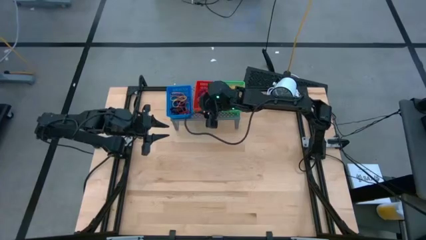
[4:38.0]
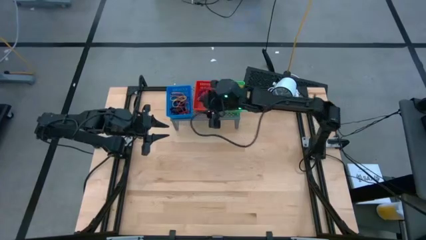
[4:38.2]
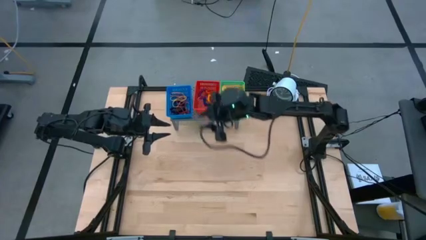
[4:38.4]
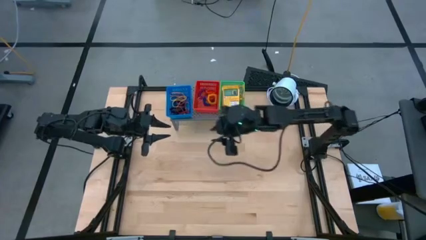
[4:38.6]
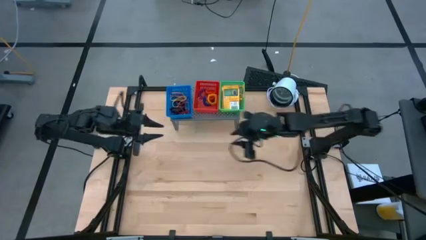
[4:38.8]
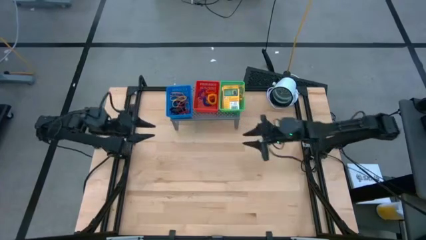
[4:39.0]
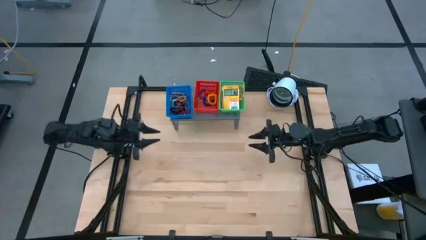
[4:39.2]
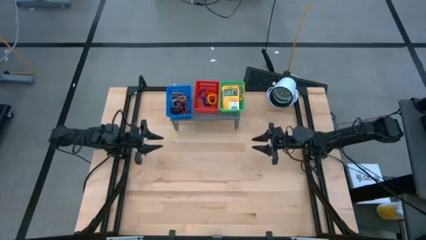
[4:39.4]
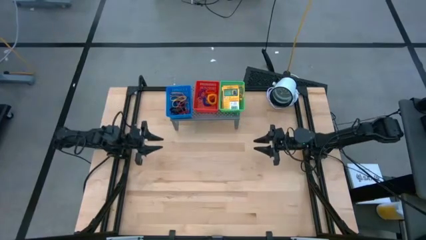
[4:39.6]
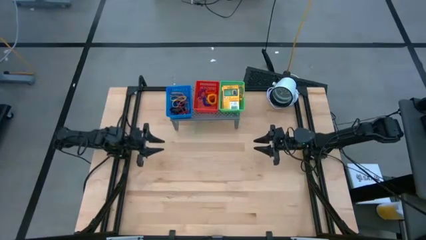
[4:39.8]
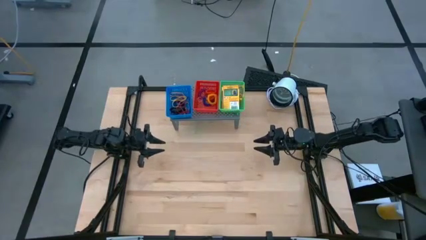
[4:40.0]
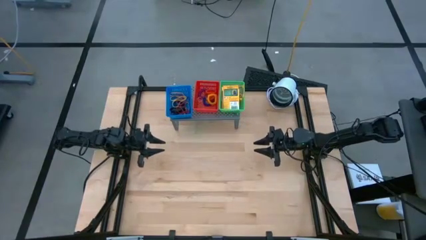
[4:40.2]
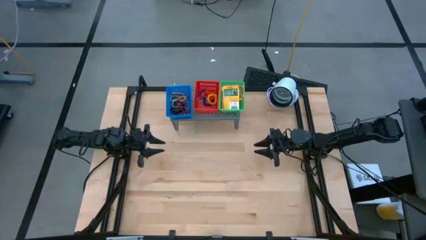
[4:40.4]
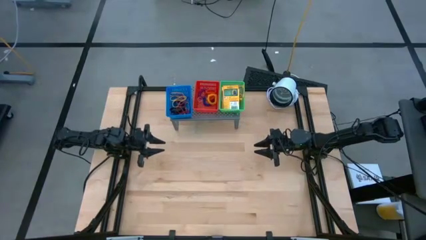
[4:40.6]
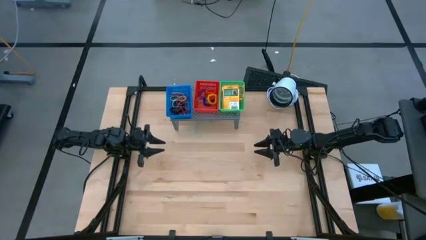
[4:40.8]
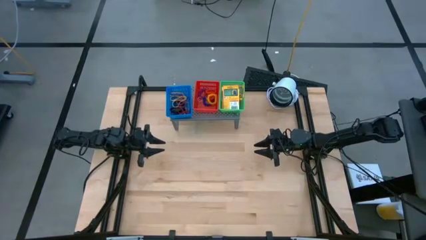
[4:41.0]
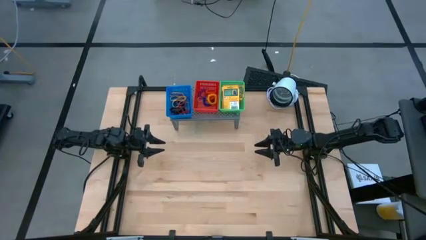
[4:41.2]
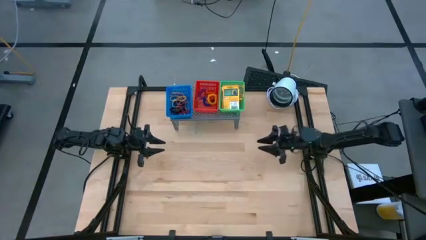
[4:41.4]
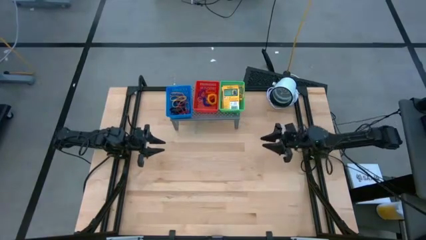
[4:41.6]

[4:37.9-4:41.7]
Task: Pick & Place Office Desk Supplies
Return to Home Position

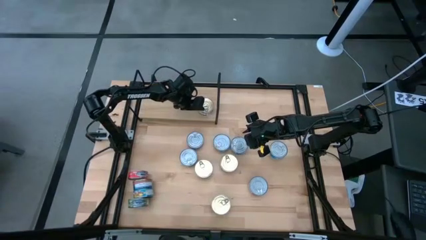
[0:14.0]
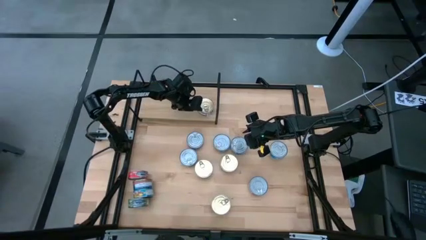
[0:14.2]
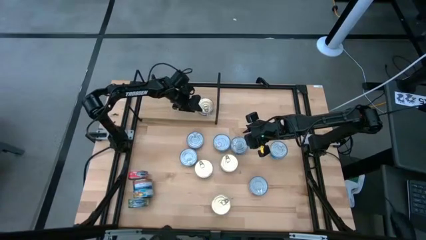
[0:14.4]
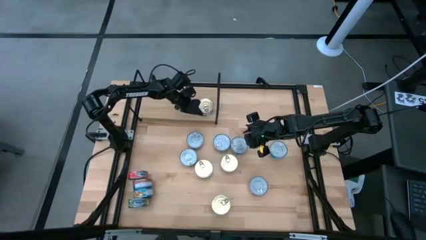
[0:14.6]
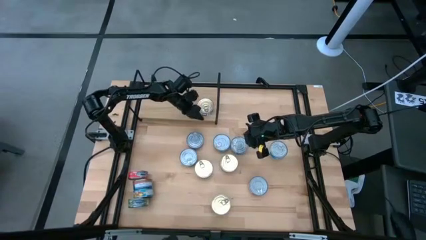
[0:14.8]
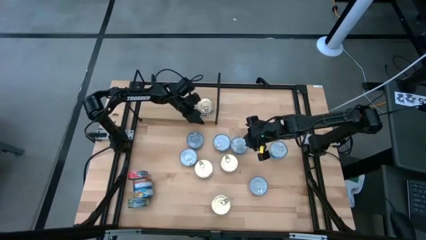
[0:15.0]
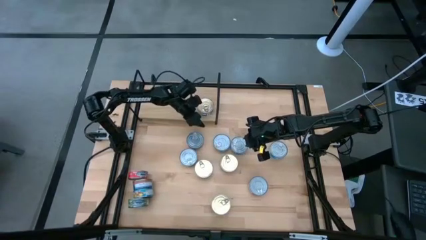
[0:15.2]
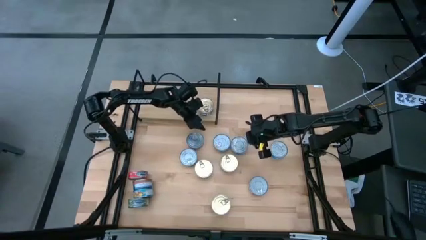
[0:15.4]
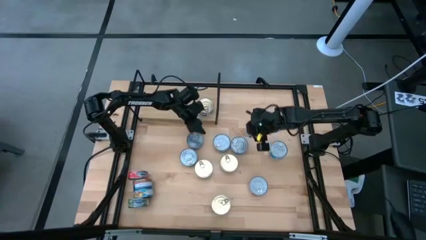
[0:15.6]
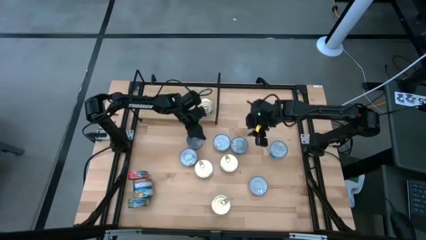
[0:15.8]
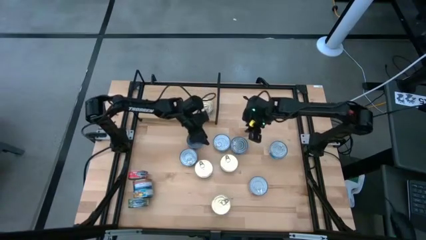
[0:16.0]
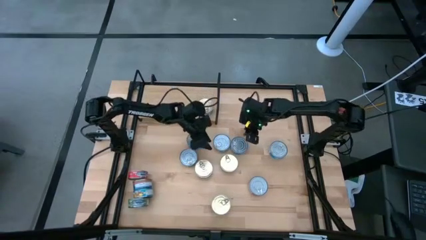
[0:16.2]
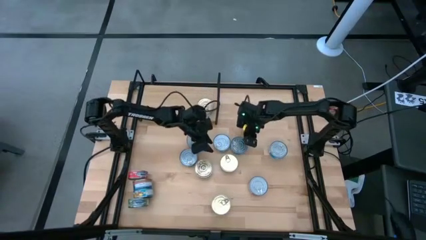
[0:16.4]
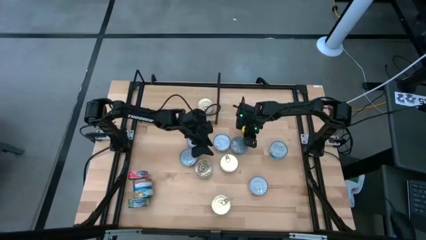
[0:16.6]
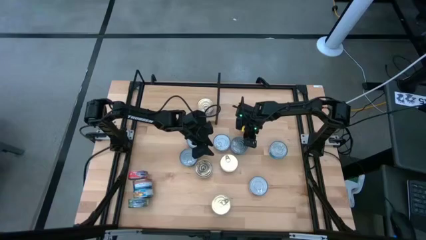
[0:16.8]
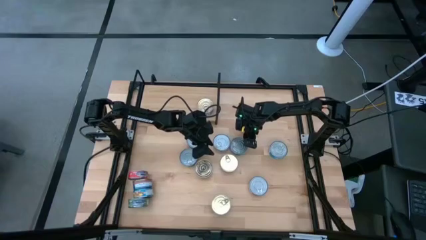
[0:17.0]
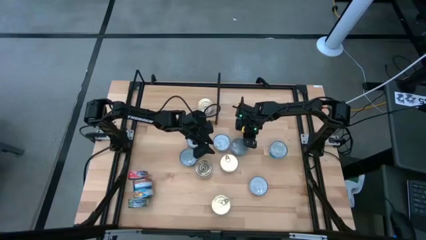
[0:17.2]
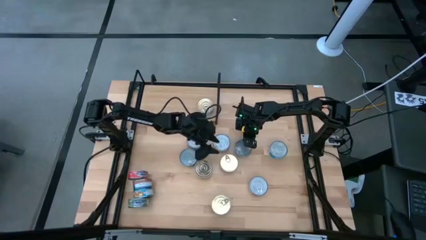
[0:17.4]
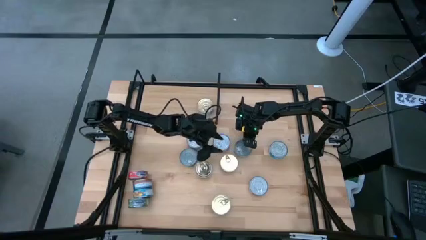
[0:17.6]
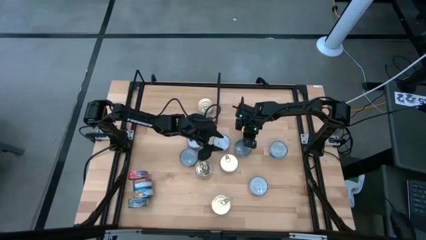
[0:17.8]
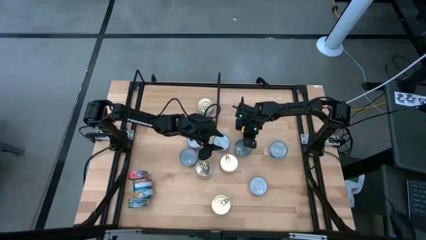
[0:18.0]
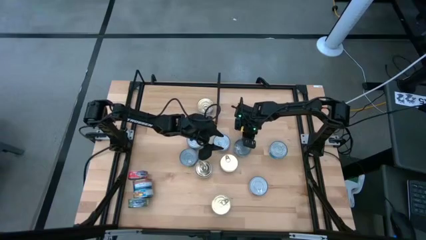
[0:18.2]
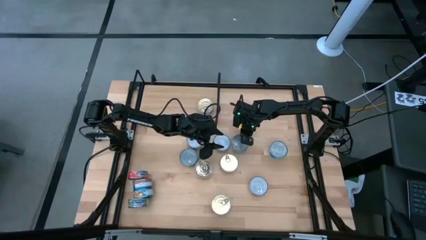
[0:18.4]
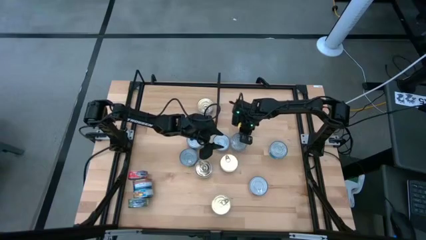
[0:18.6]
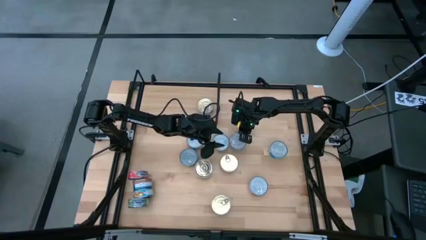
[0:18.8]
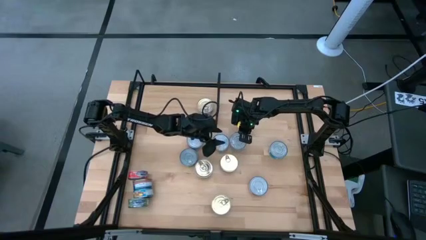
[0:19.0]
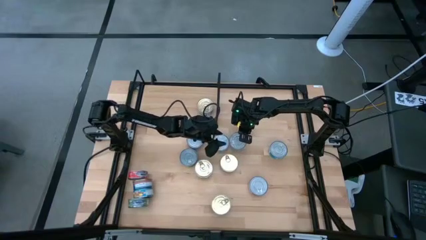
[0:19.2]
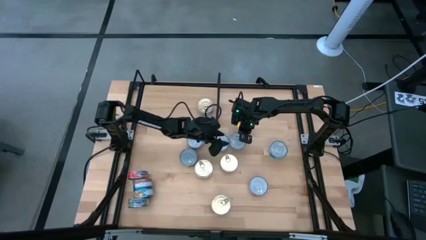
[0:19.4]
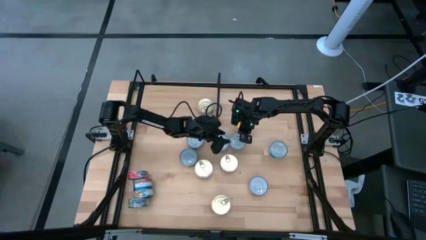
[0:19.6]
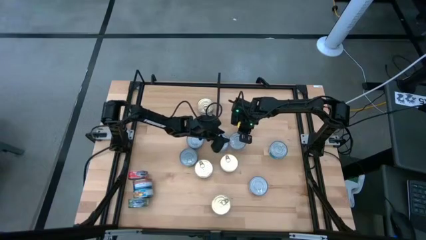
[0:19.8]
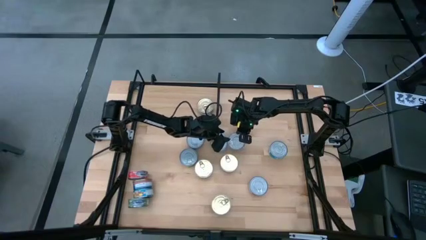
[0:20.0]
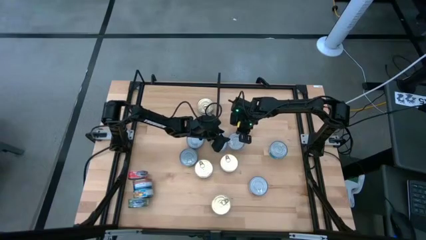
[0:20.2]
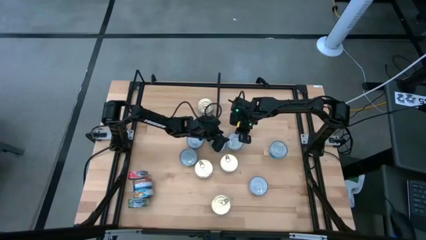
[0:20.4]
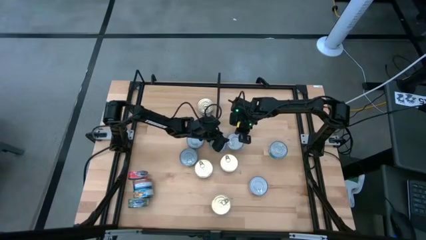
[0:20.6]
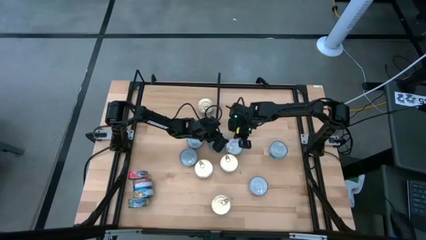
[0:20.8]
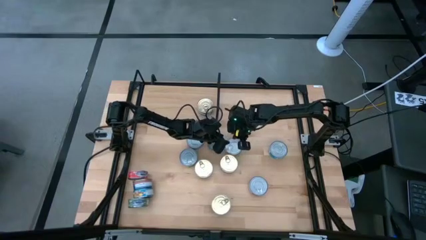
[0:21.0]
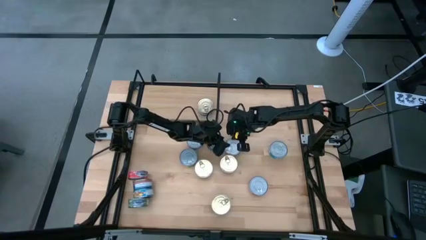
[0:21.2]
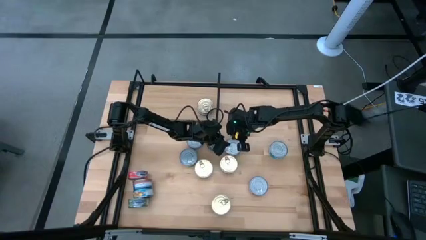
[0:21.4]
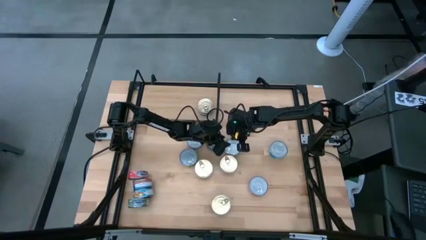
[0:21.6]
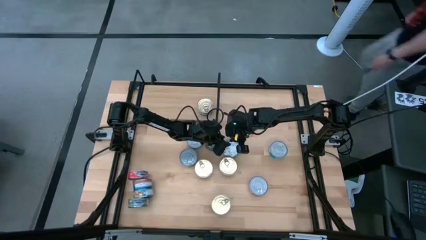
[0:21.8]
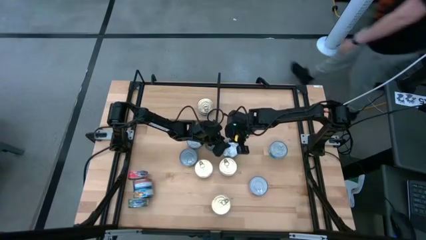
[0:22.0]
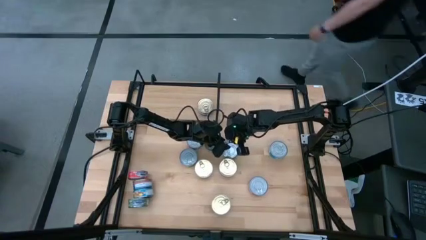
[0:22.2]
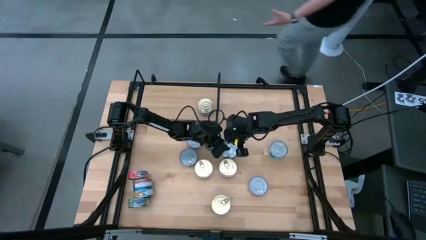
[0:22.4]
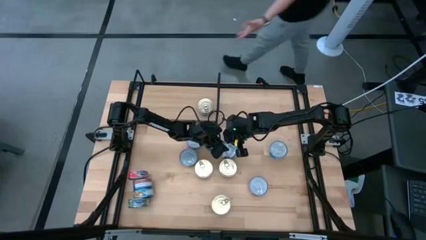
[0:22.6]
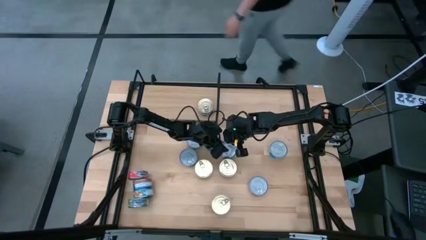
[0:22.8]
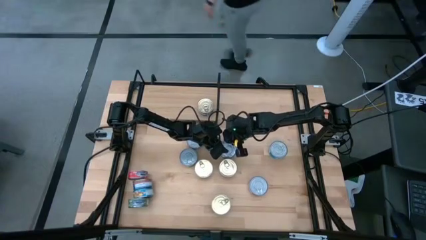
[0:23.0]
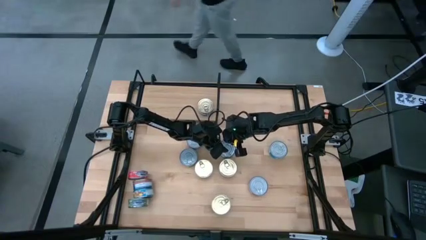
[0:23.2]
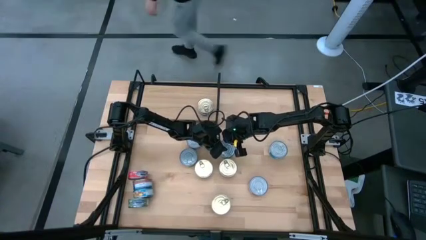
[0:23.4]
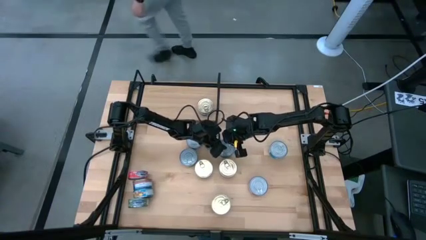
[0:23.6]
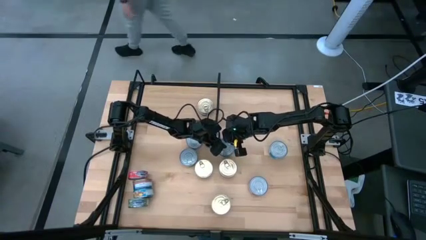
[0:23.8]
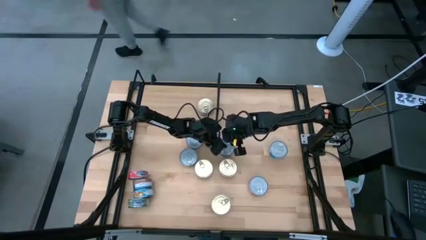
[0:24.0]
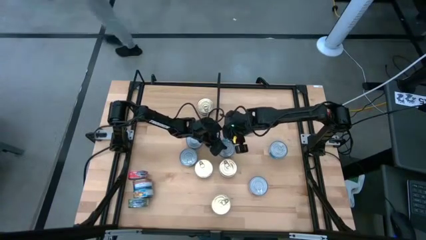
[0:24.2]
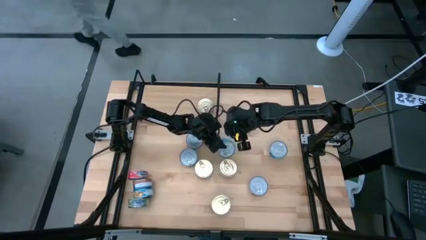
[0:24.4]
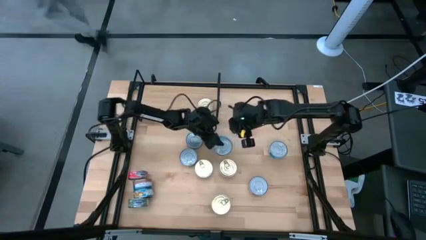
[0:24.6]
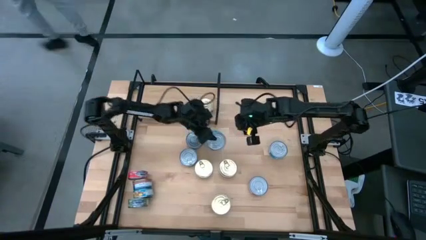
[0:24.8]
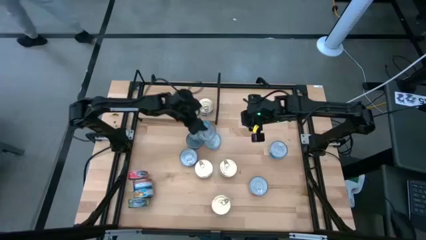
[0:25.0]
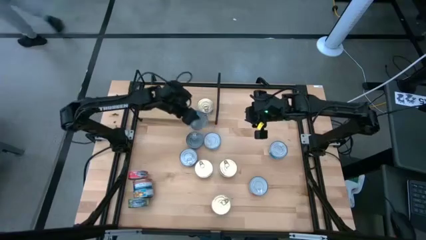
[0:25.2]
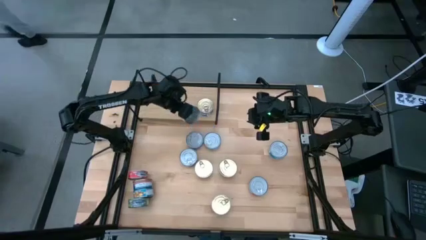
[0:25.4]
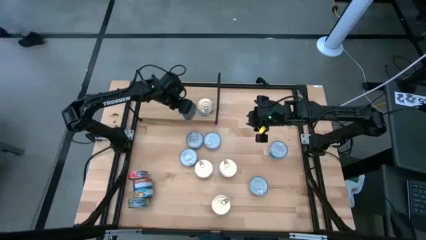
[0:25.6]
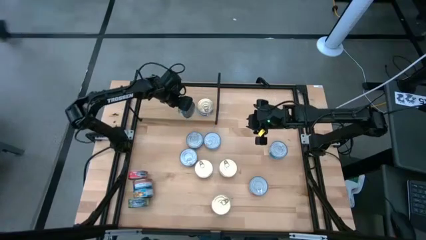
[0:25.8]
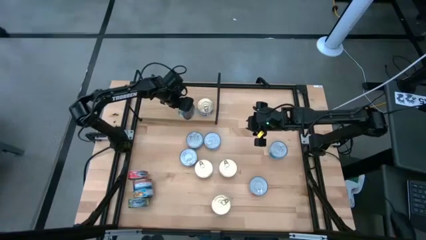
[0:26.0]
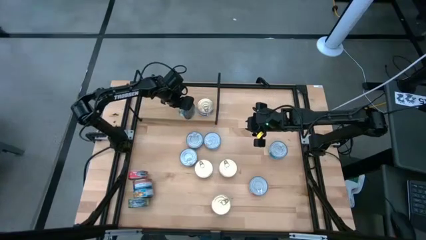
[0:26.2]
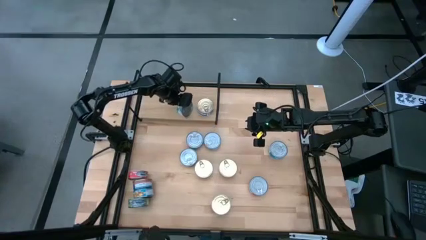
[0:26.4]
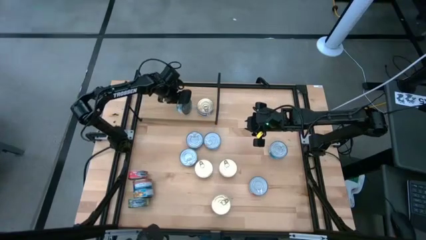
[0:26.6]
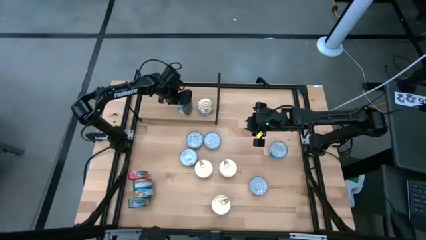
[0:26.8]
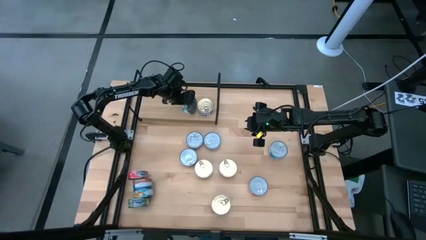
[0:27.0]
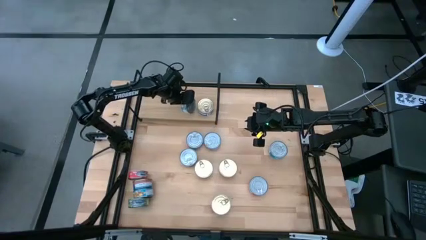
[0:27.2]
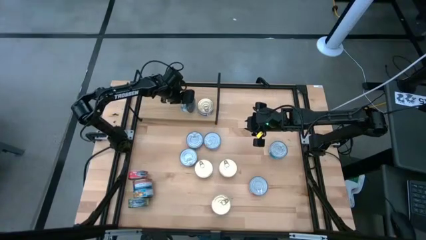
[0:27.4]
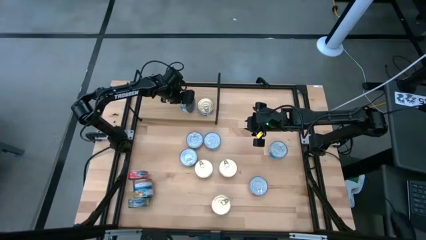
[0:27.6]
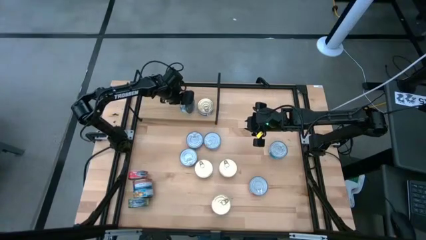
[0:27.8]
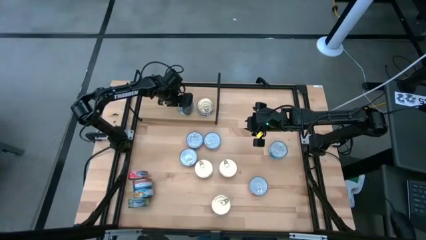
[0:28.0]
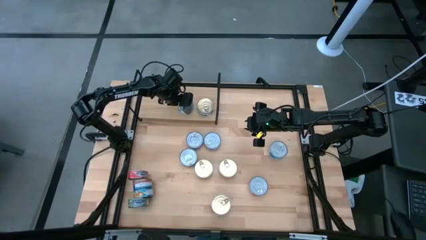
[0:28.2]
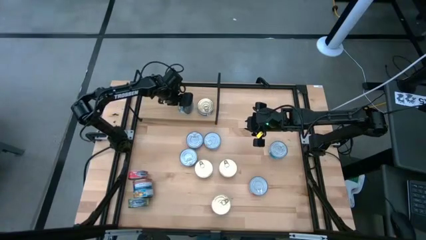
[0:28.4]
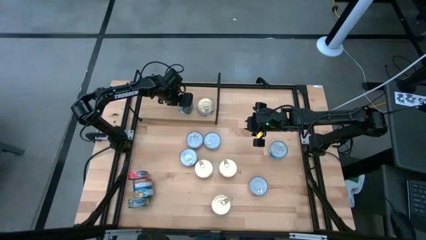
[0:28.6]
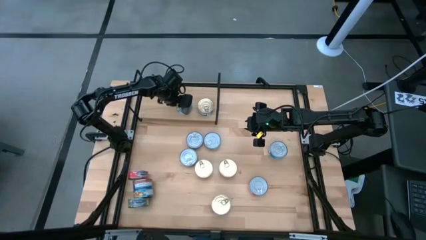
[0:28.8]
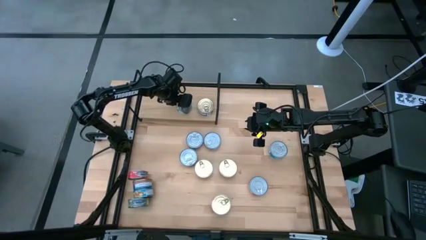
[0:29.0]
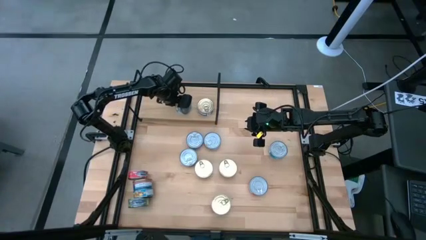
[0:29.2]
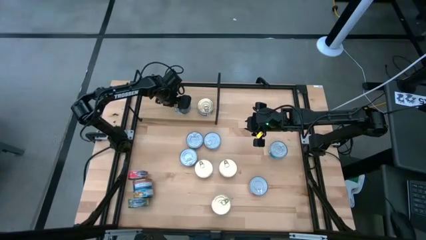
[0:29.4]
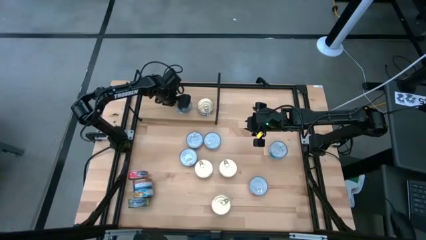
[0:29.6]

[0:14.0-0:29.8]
Task: Stack canned seafood by type on shelf
Put the yellow blue tuna can on the shelf
